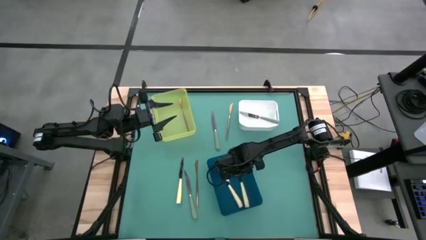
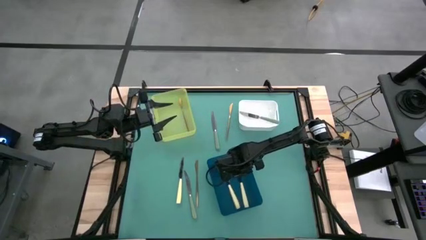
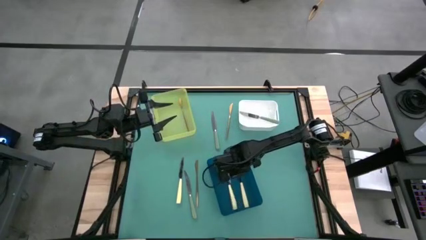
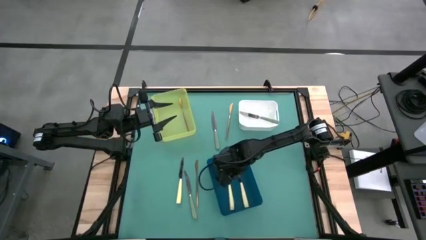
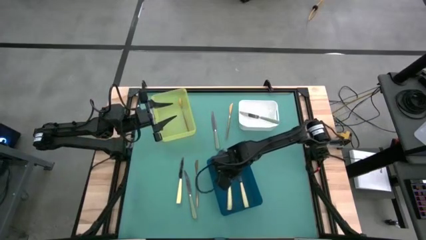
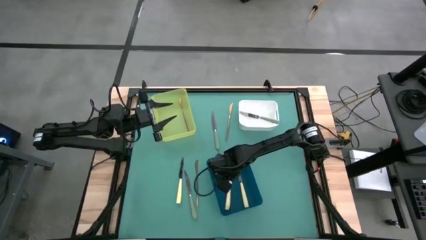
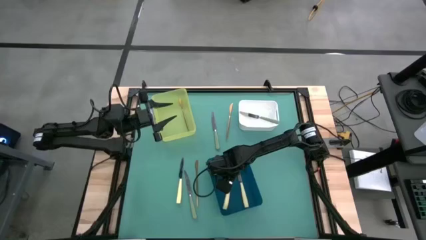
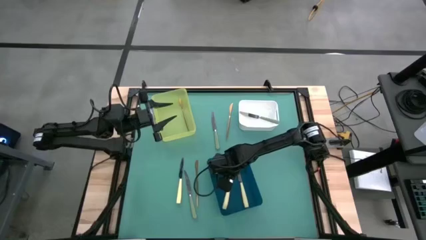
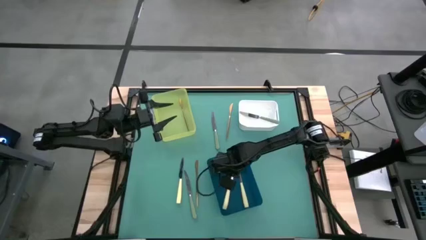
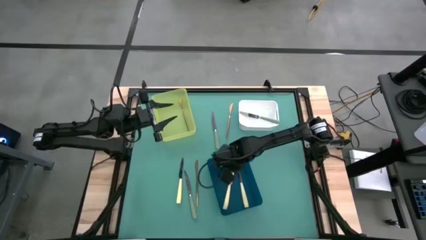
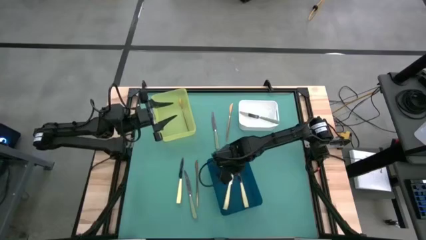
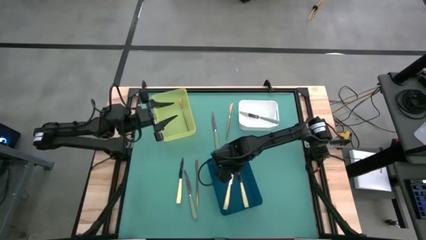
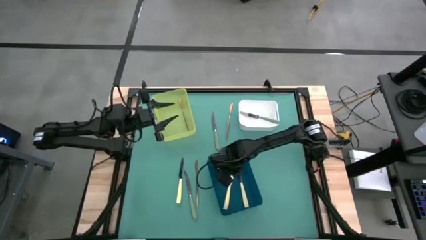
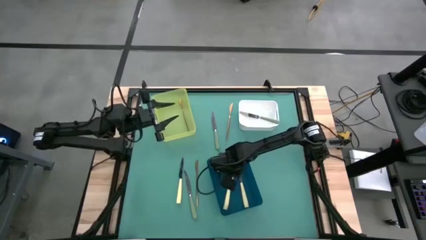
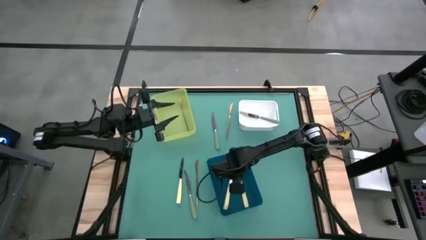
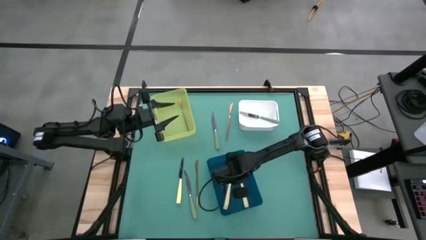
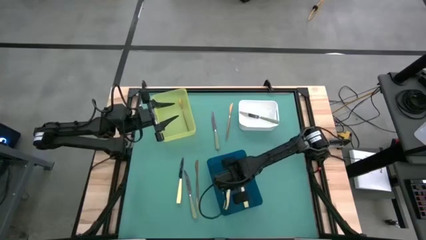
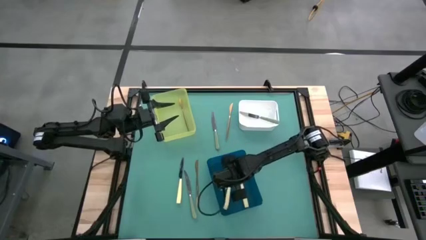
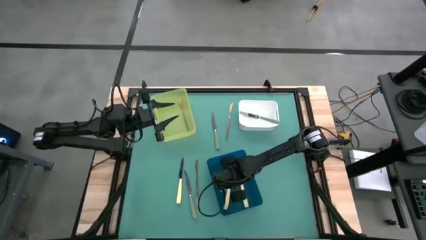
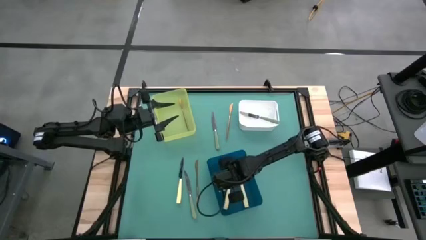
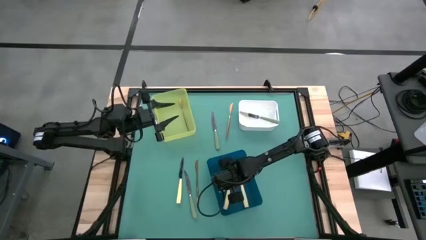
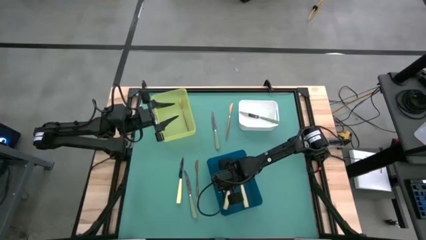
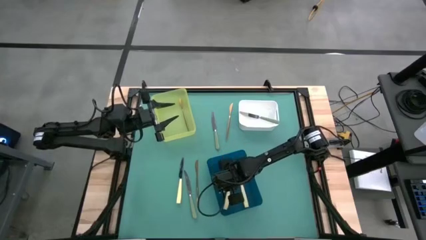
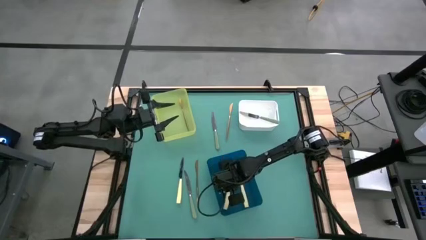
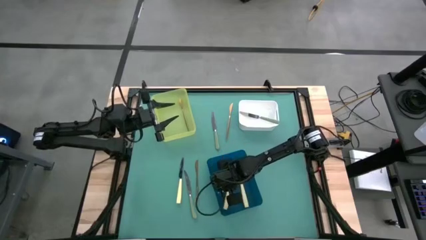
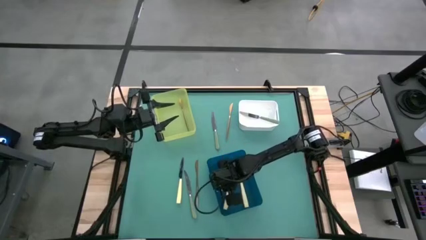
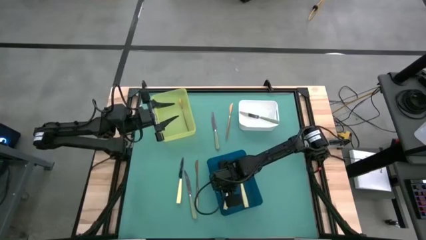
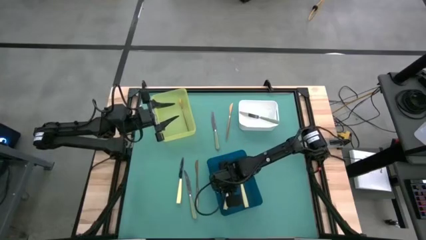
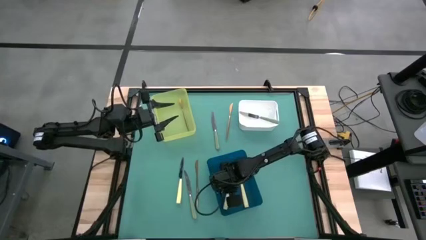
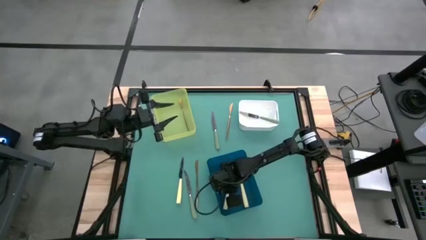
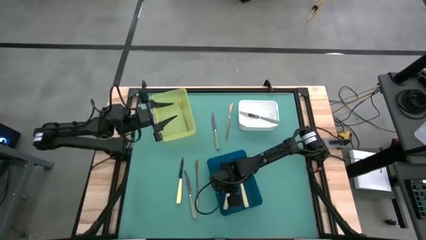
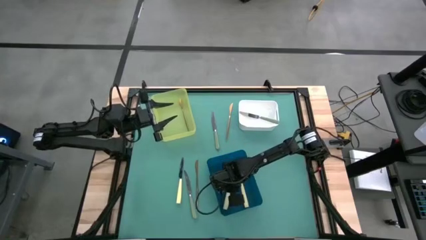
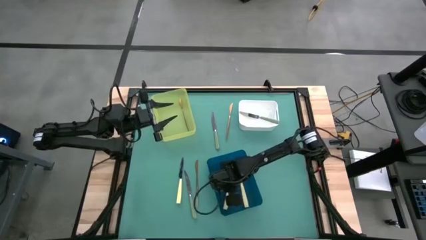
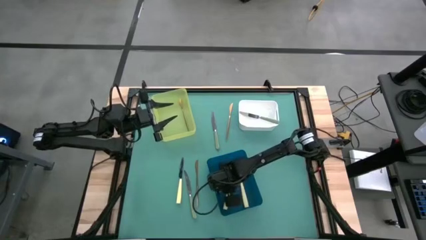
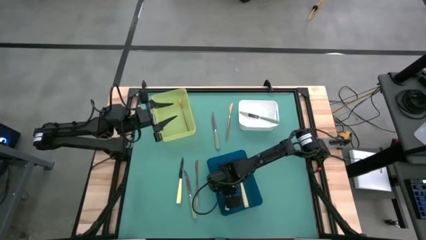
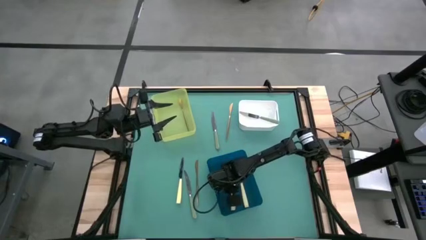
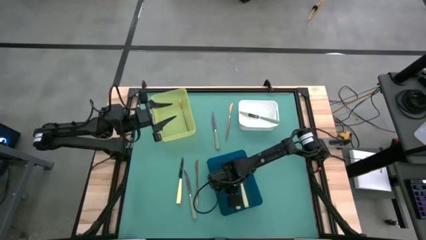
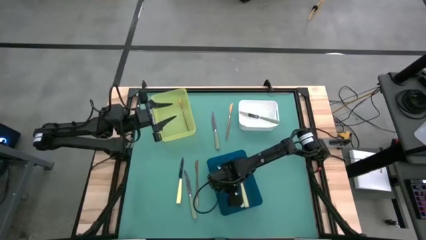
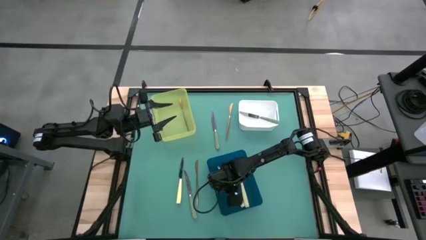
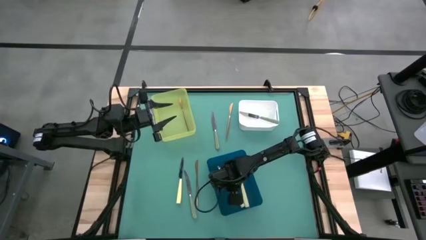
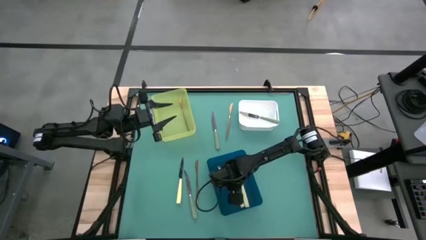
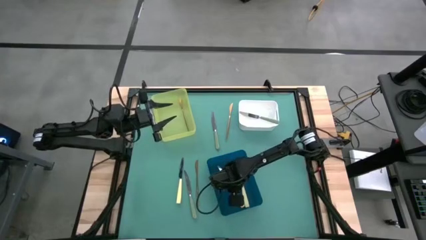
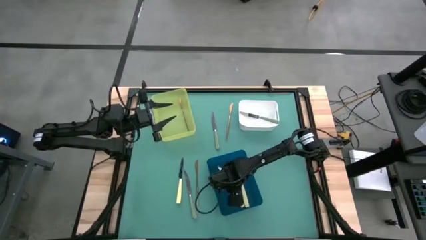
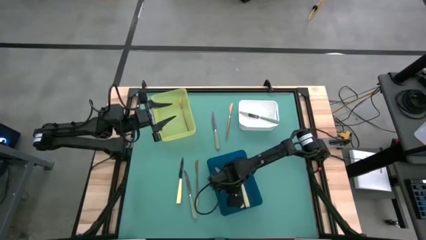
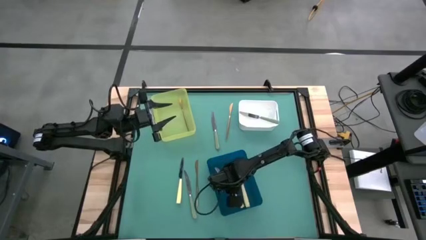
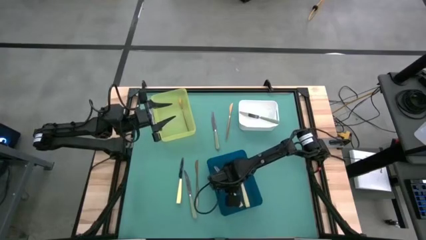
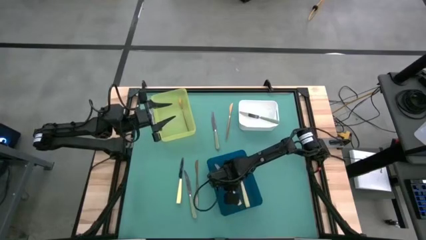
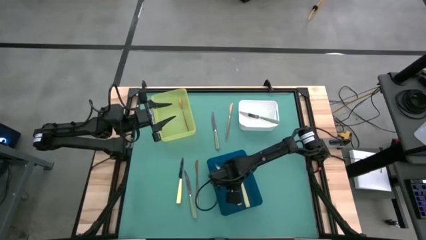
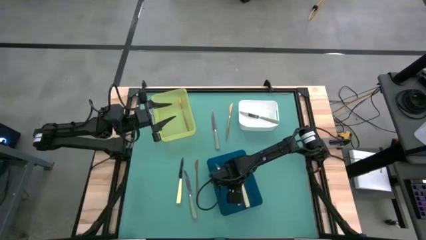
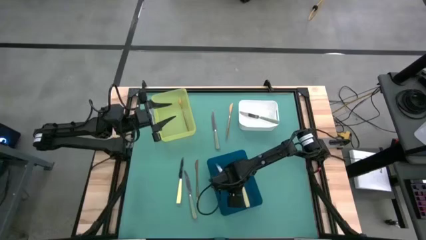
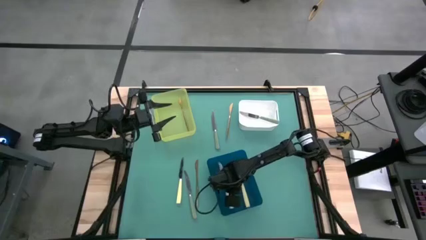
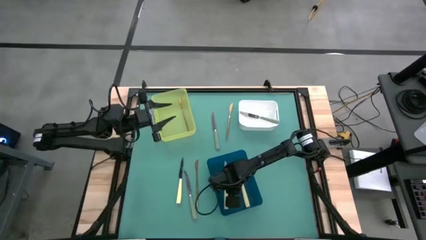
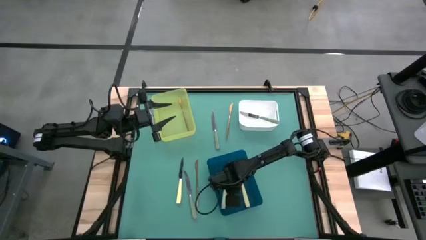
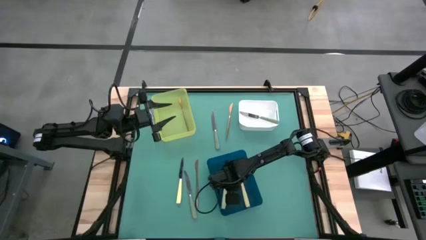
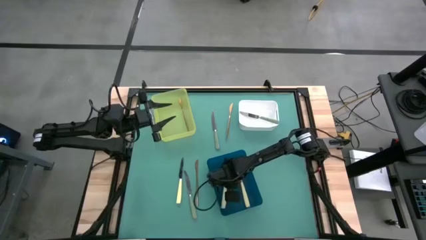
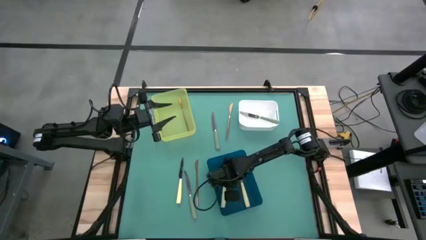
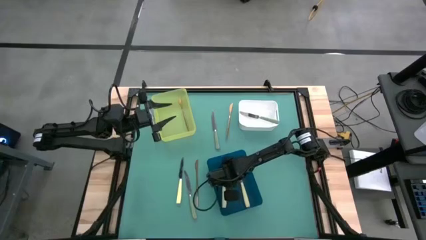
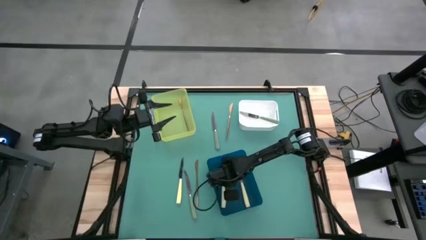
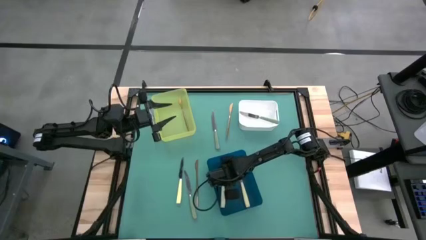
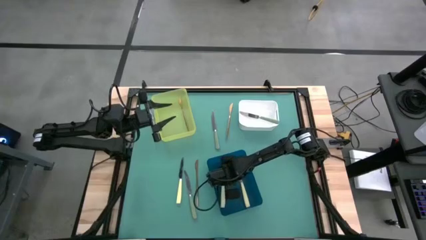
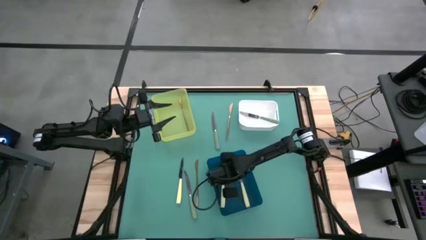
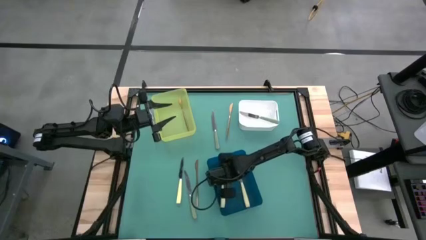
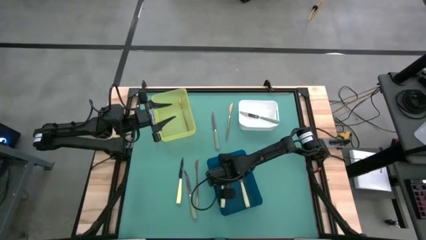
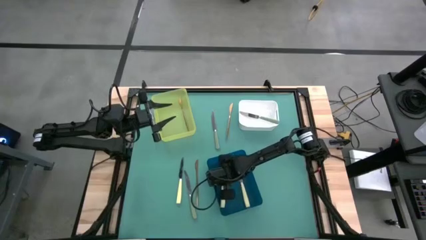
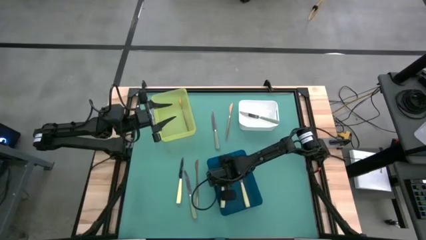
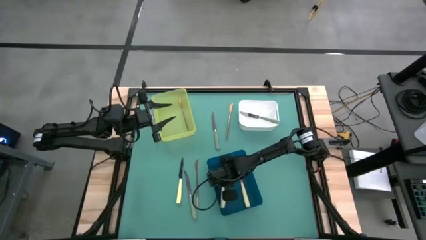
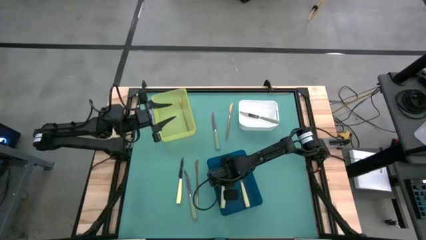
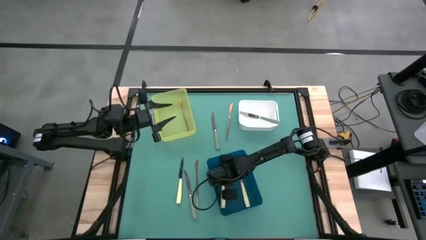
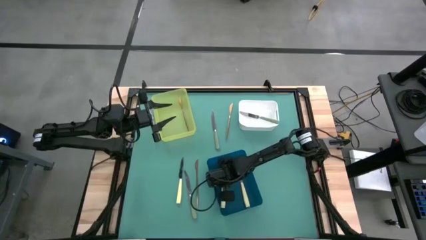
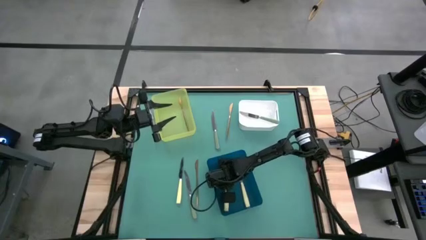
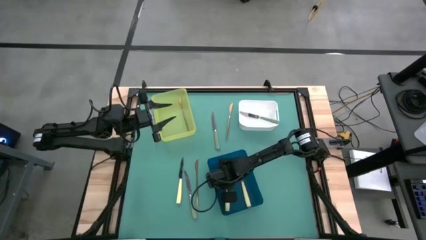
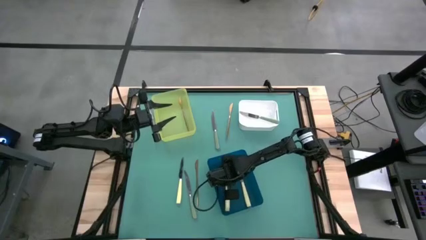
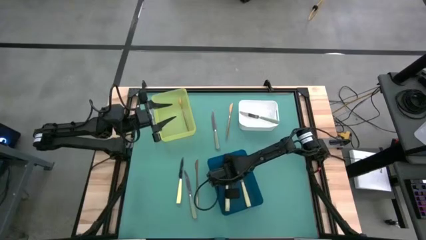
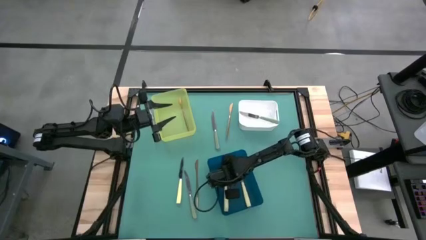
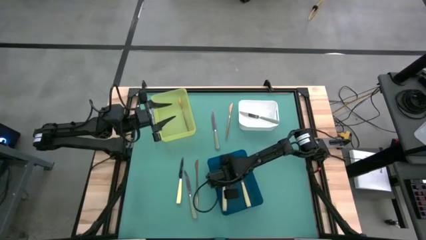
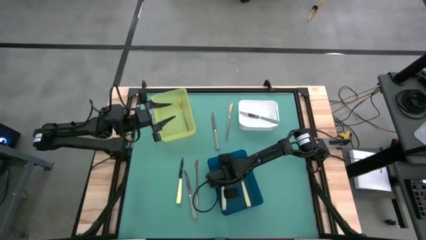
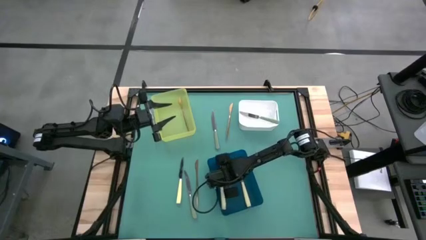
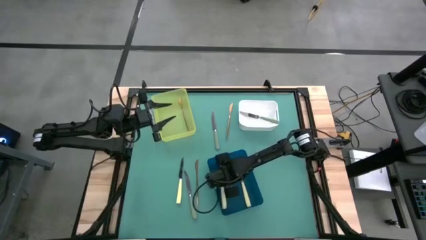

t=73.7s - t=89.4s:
Task: Sort silverware by color (type)
Adjust the yellow knife in the blue bin
